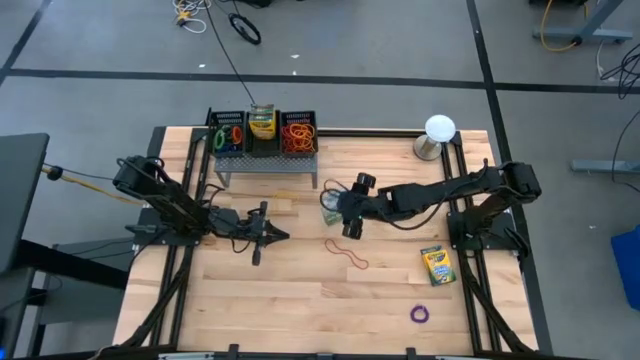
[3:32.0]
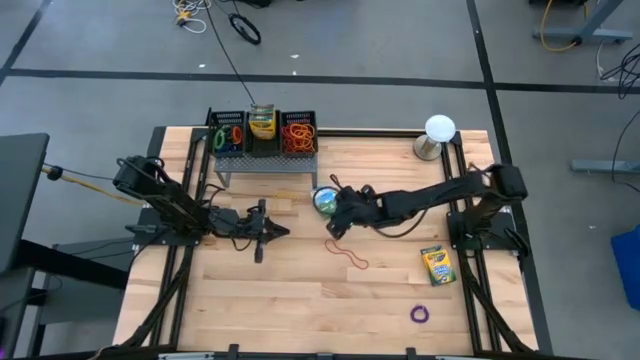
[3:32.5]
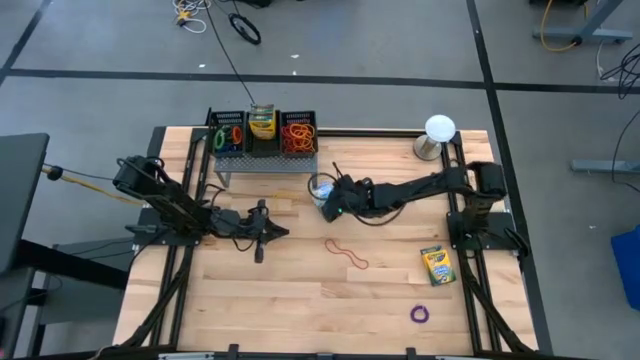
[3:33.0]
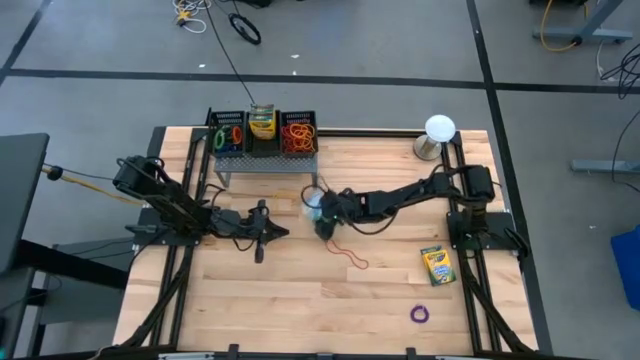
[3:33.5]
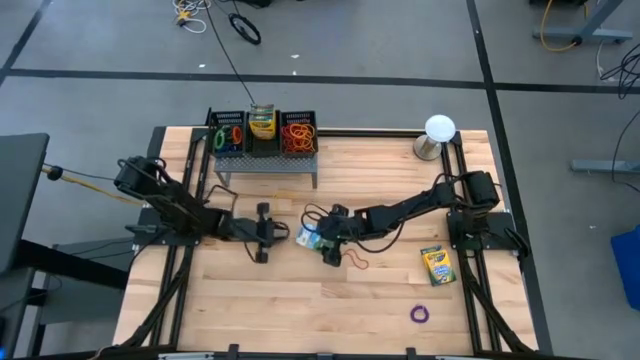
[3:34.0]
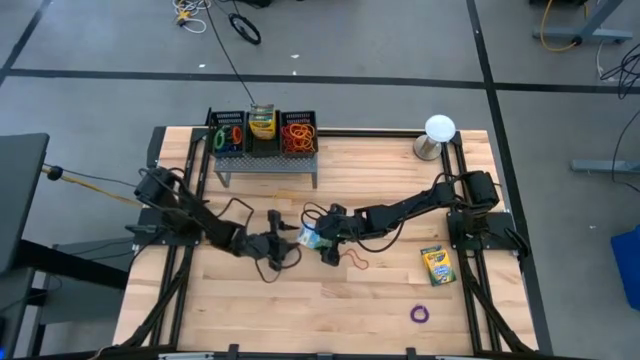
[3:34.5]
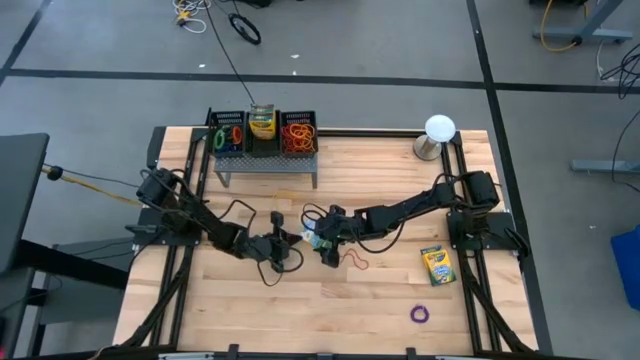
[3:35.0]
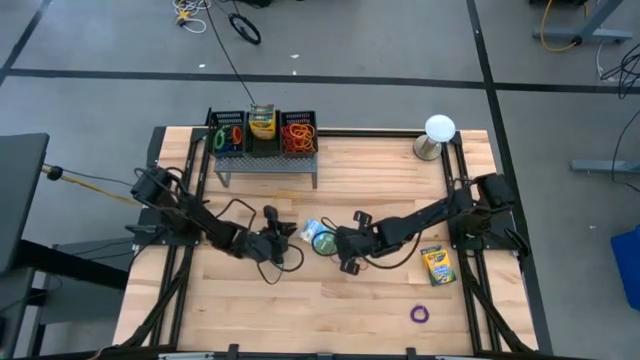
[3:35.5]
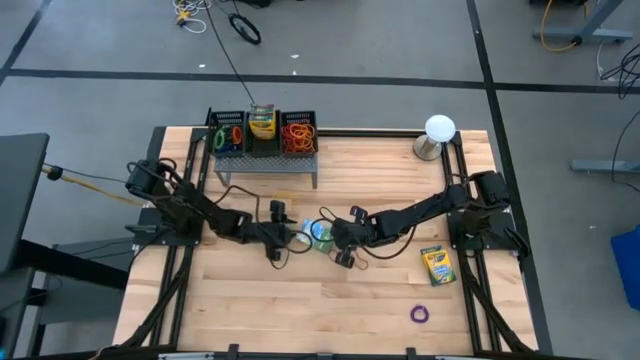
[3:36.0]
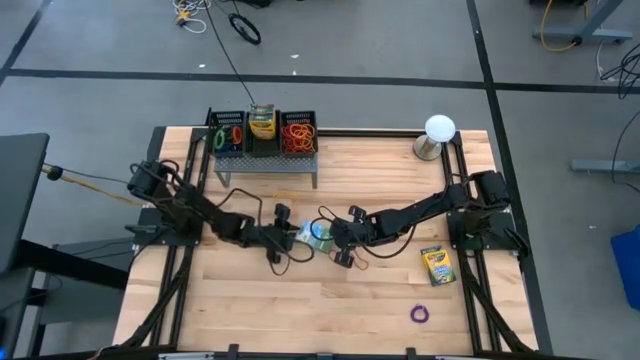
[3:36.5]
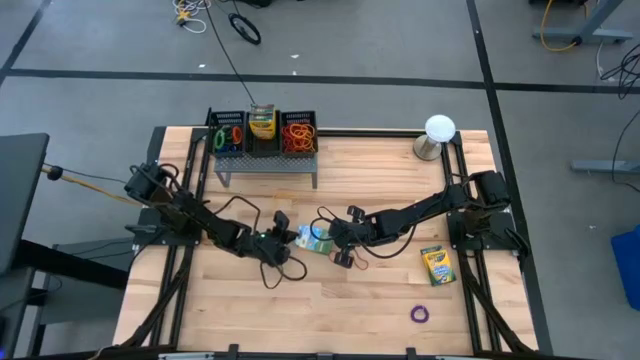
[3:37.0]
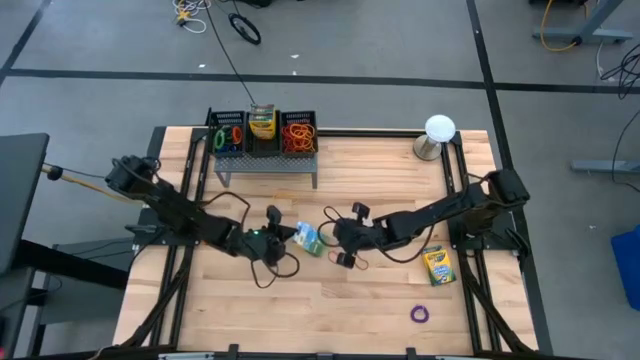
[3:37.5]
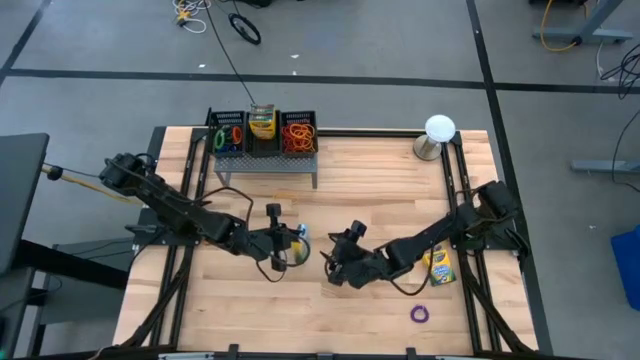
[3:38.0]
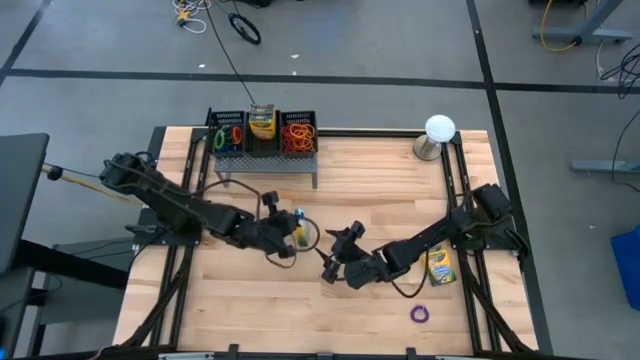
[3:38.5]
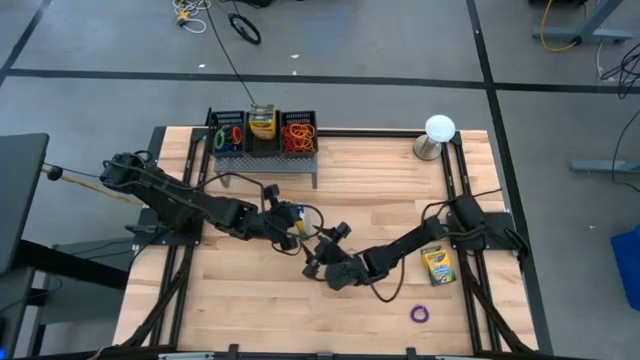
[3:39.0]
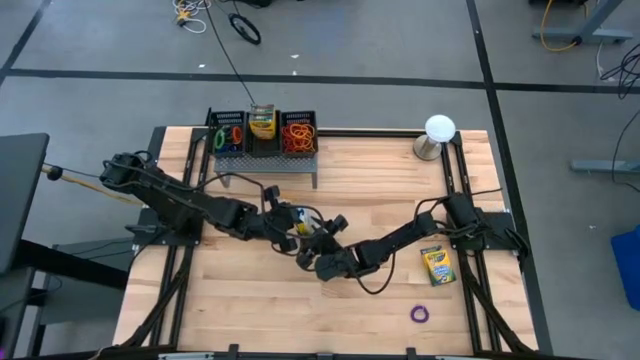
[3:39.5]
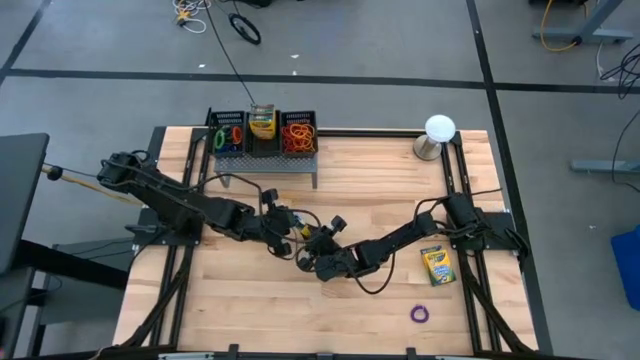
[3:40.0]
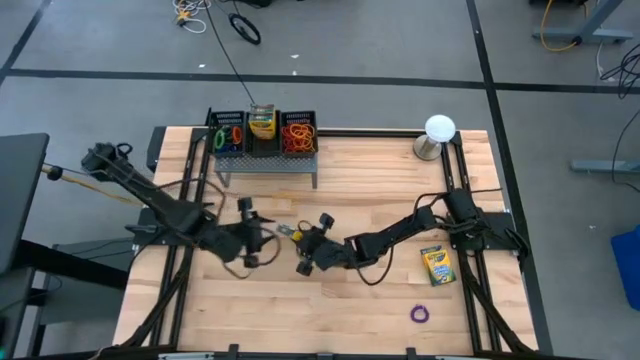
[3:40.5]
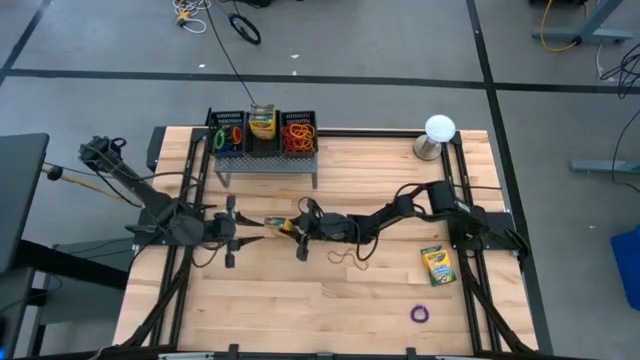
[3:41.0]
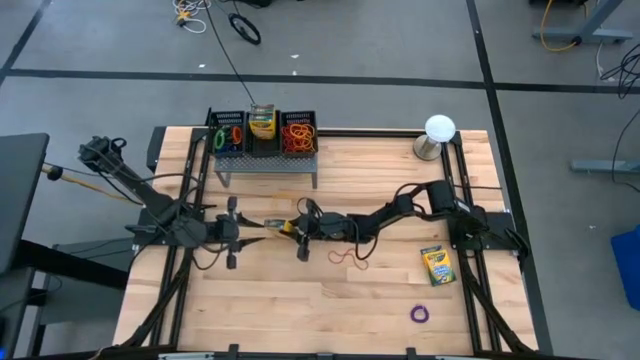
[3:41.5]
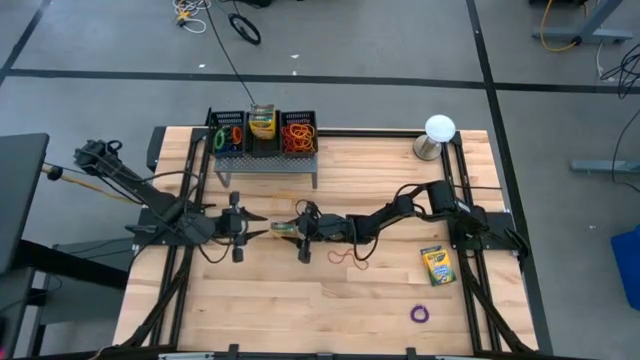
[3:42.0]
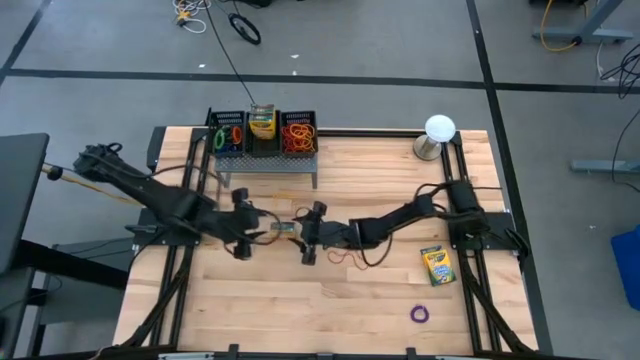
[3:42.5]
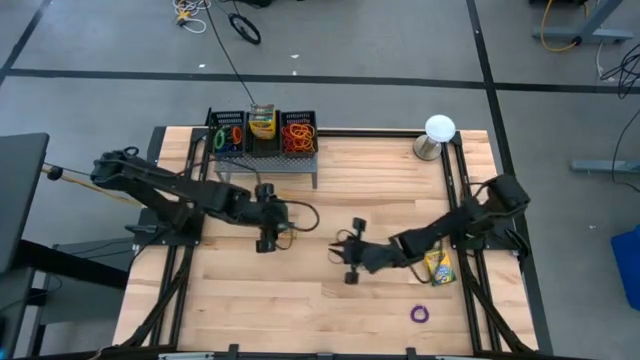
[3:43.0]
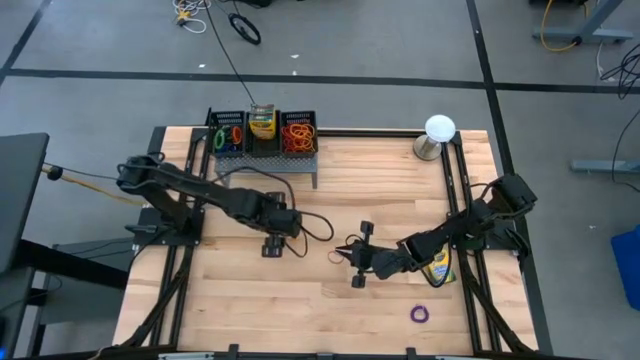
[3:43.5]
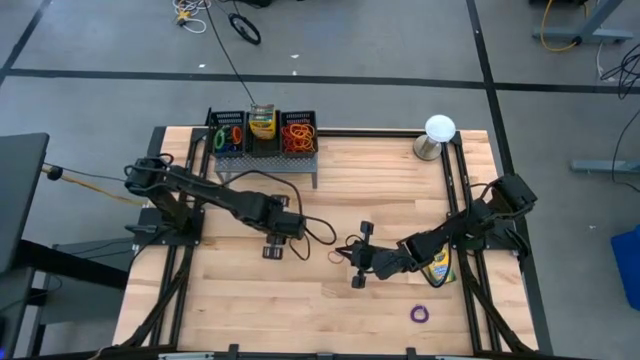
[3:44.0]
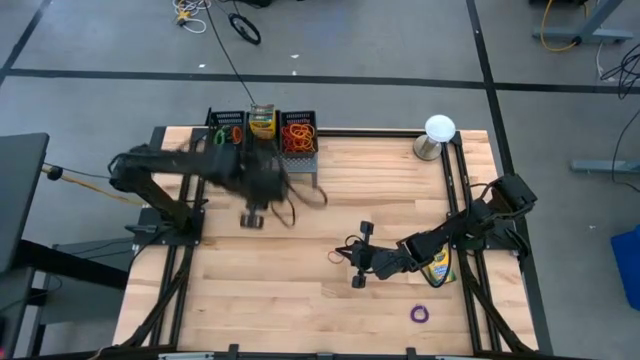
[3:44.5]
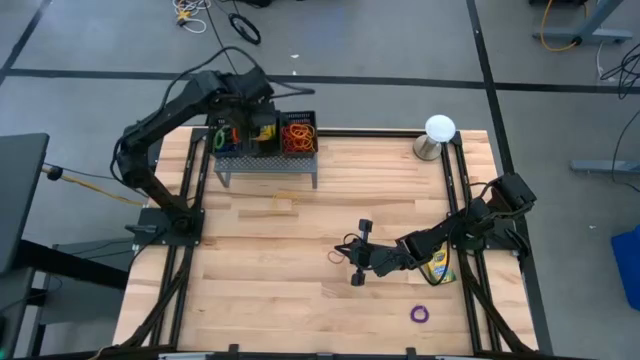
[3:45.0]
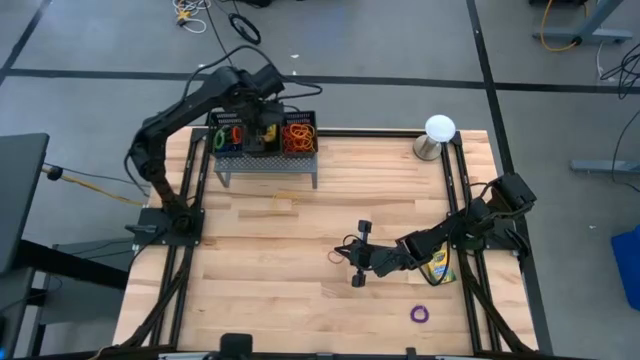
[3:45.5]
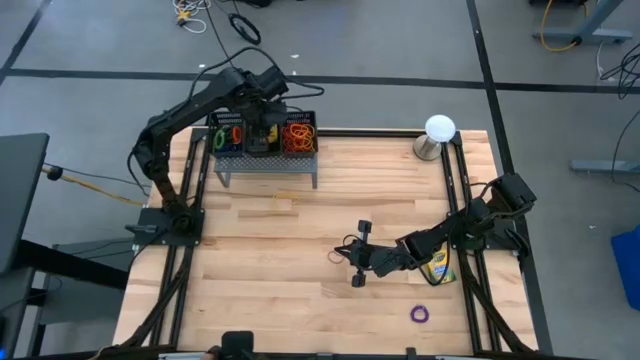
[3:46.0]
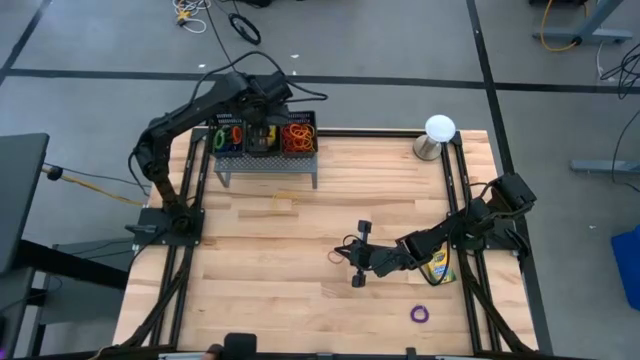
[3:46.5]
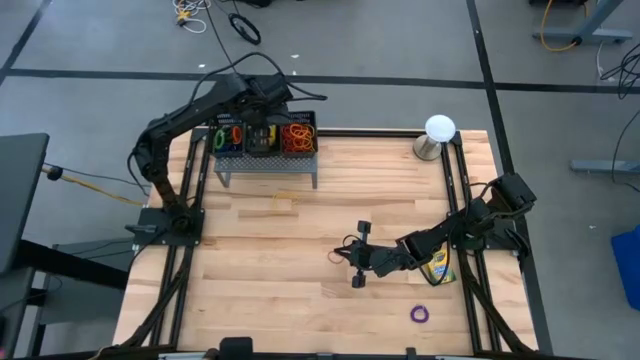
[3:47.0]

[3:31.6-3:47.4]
Task: Pick & Place Office Desk Supplies
Put the yellow crayon box into the middle black bin

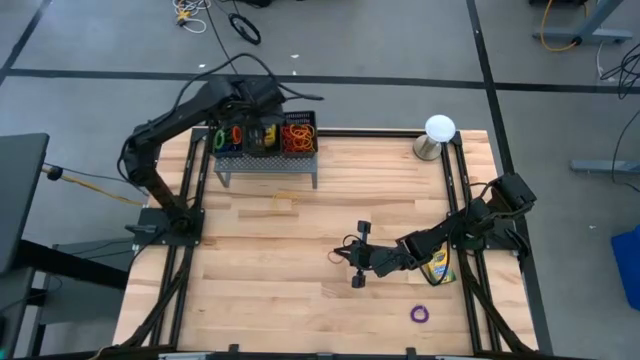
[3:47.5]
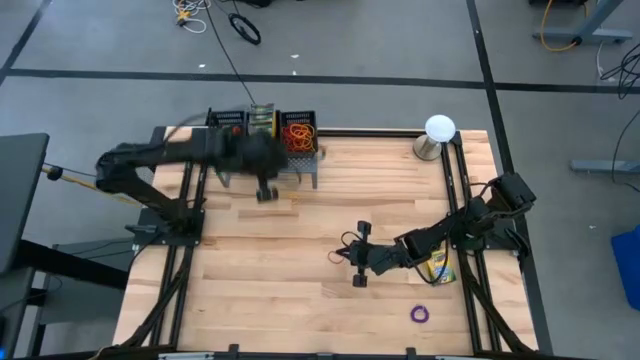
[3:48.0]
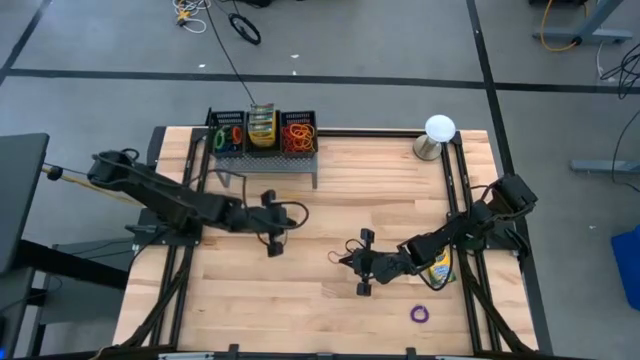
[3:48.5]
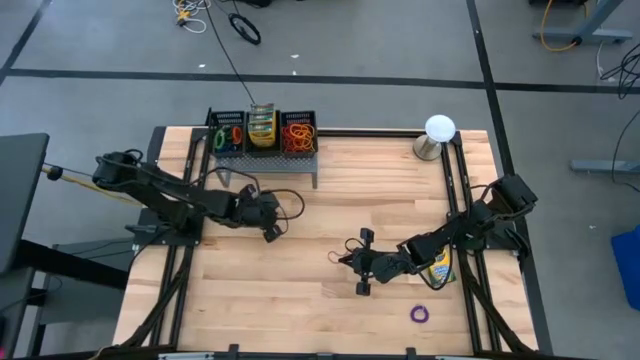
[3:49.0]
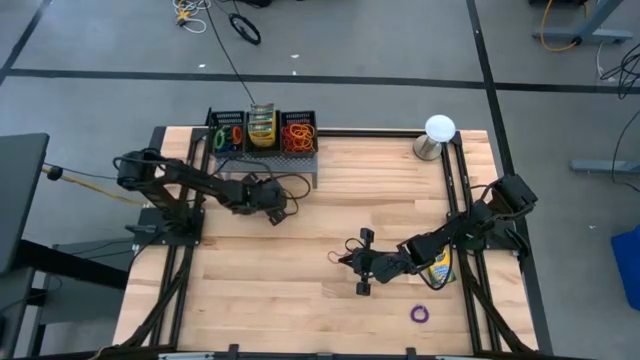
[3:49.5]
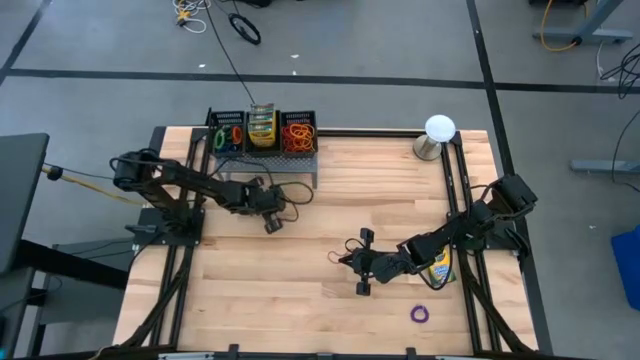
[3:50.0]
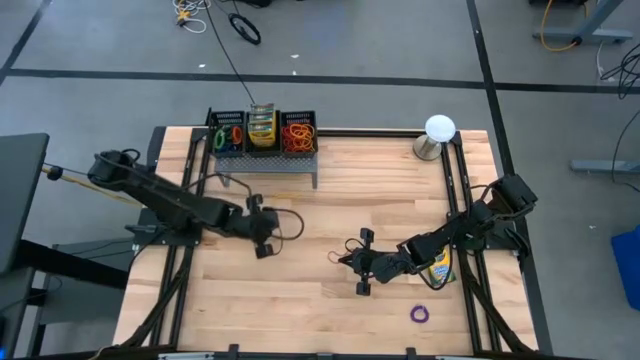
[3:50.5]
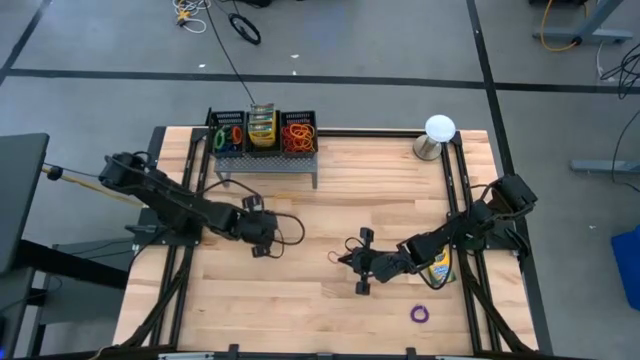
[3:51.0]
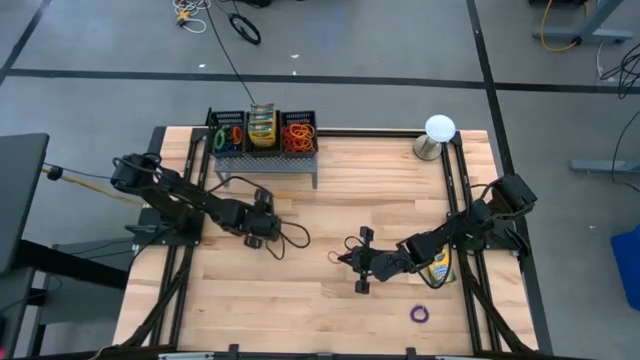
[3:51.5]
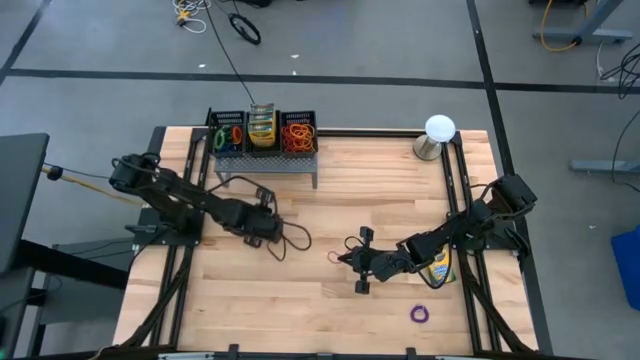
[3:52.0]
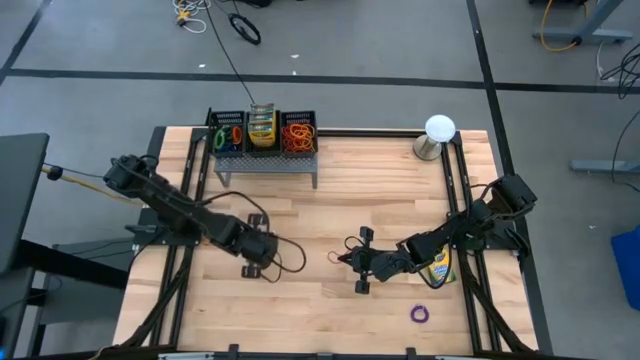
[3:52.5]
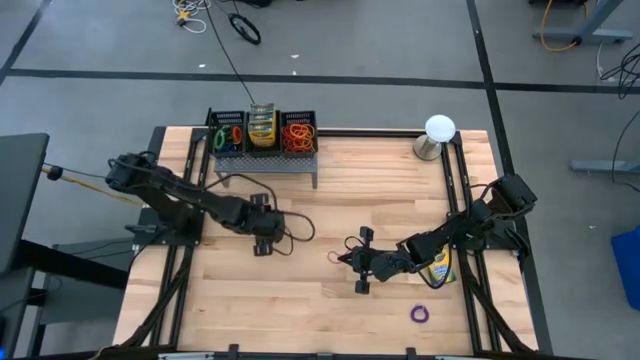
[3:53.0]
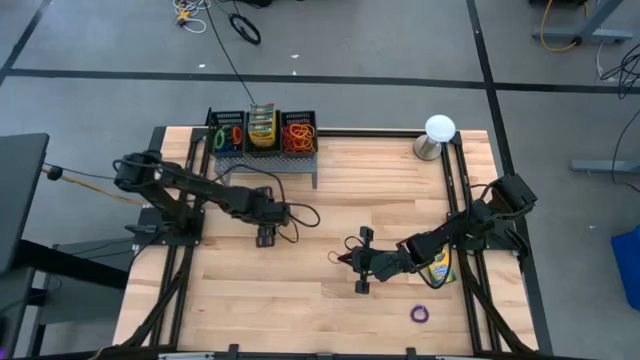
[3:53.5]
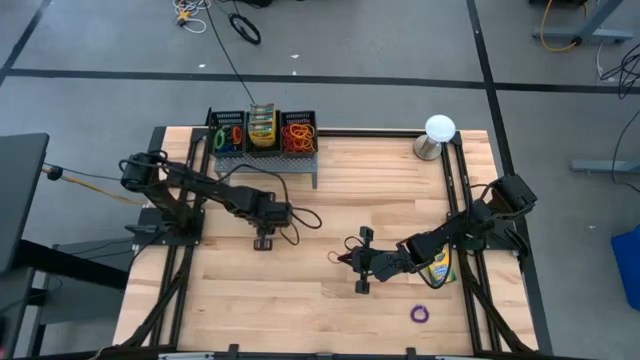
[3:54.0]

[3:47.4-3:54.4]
Put the yellow rubber band into the right black bin
